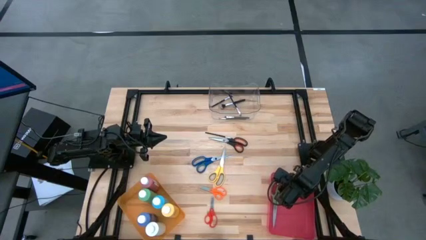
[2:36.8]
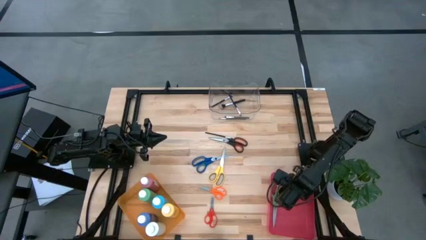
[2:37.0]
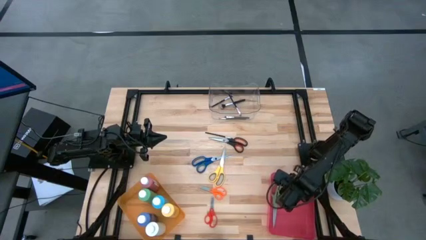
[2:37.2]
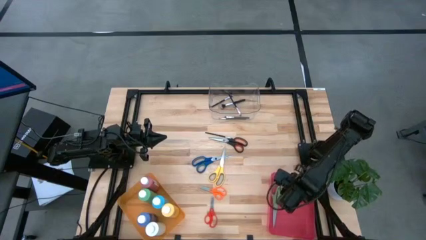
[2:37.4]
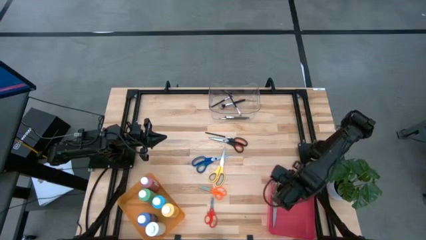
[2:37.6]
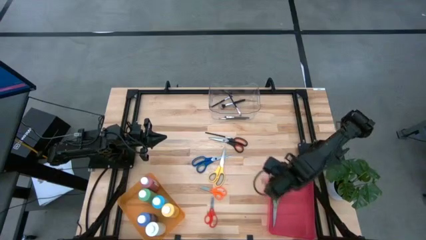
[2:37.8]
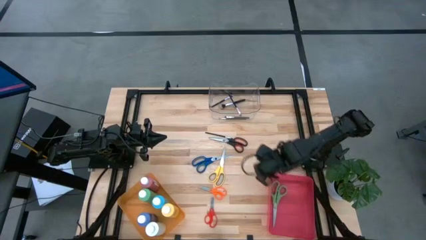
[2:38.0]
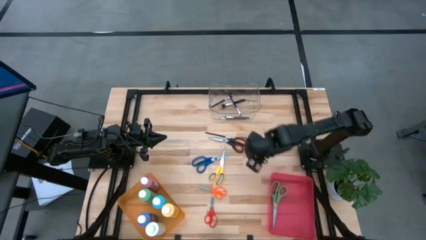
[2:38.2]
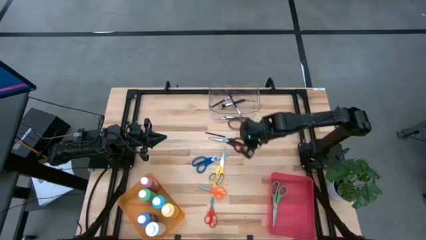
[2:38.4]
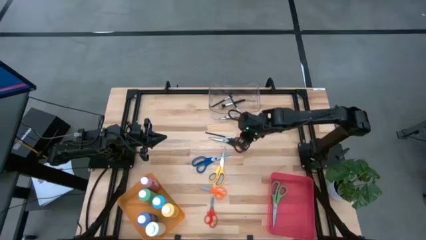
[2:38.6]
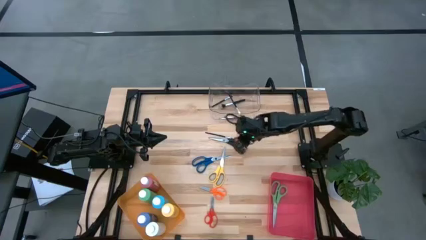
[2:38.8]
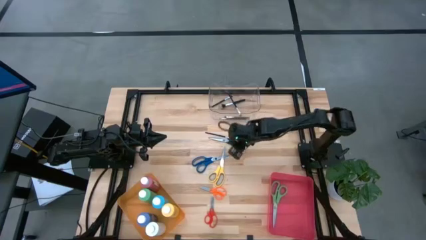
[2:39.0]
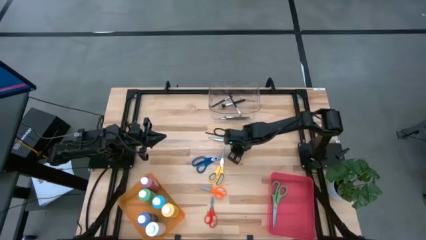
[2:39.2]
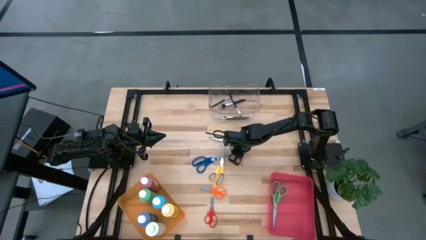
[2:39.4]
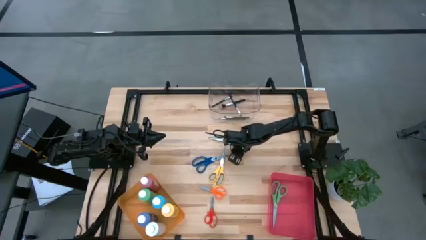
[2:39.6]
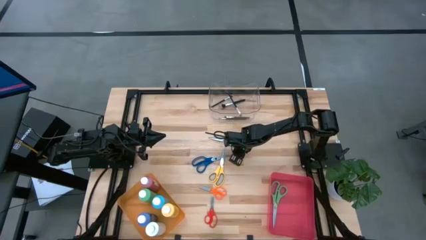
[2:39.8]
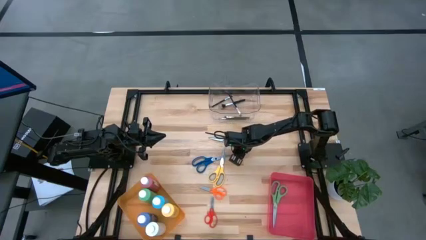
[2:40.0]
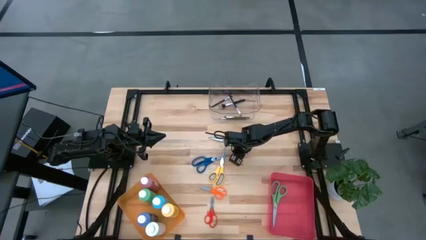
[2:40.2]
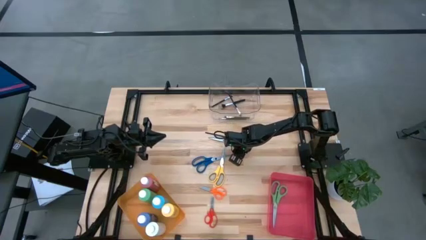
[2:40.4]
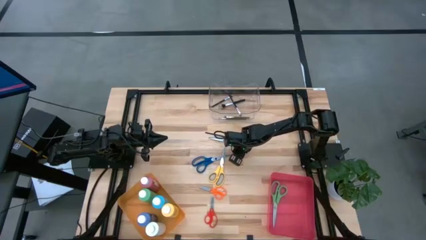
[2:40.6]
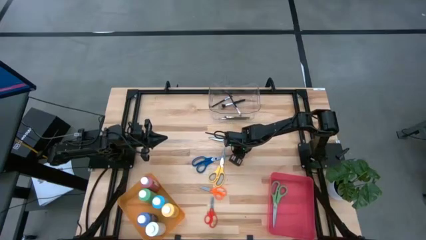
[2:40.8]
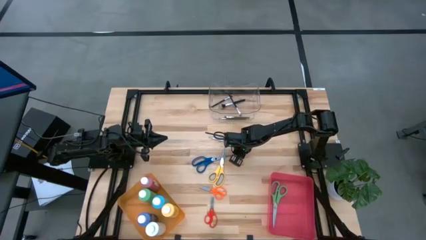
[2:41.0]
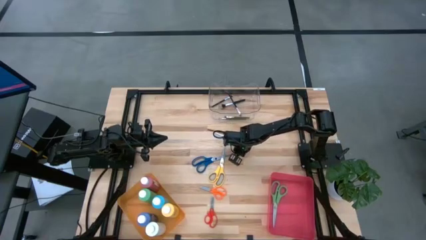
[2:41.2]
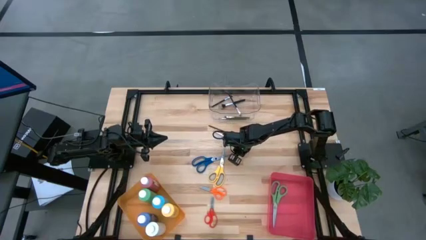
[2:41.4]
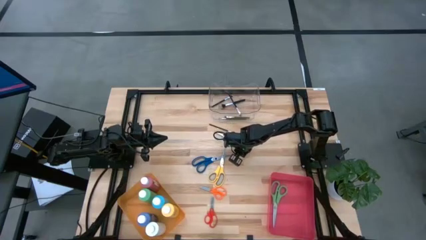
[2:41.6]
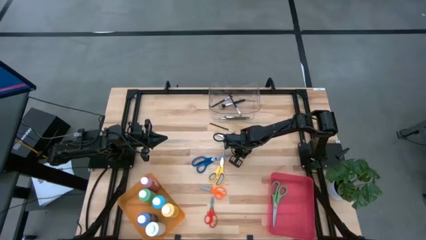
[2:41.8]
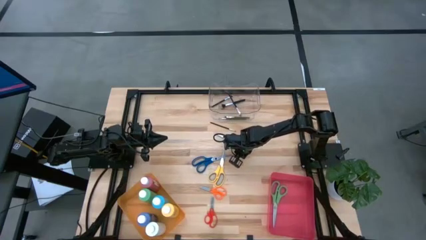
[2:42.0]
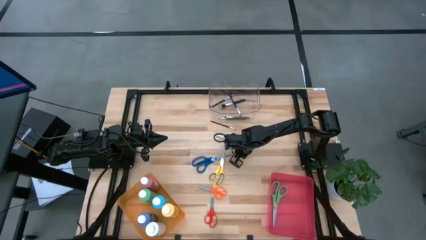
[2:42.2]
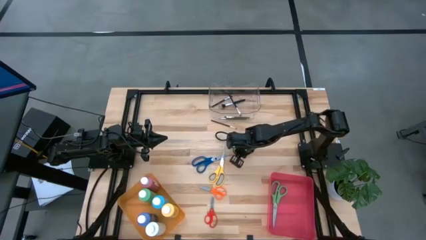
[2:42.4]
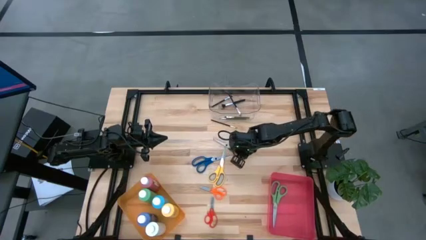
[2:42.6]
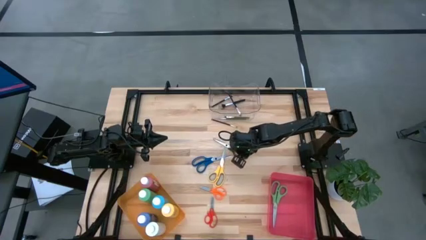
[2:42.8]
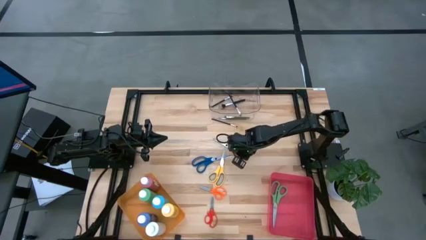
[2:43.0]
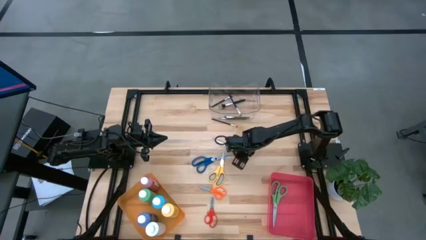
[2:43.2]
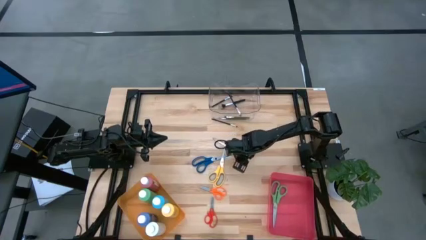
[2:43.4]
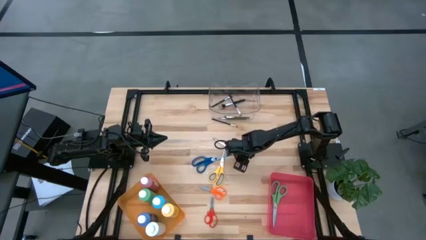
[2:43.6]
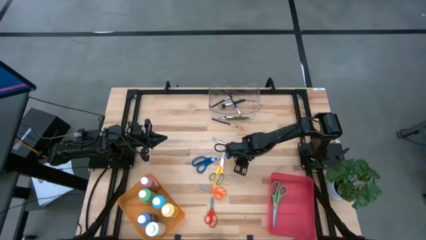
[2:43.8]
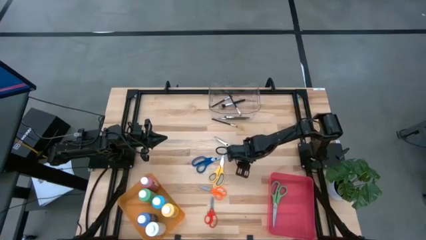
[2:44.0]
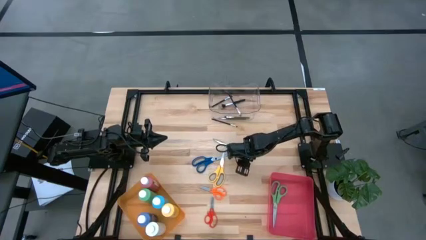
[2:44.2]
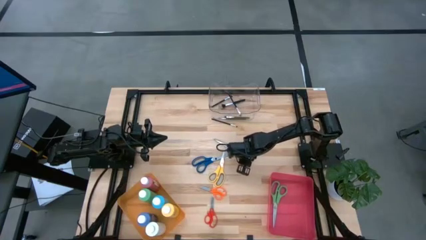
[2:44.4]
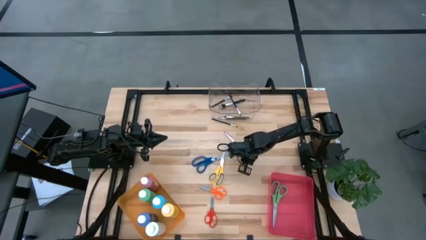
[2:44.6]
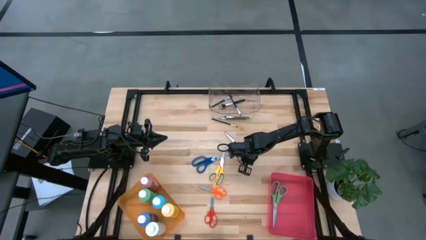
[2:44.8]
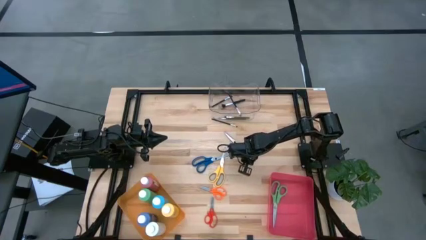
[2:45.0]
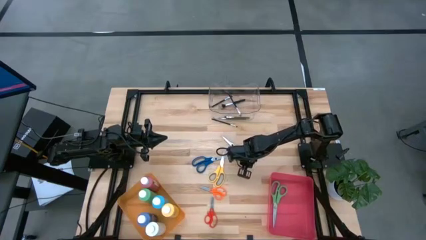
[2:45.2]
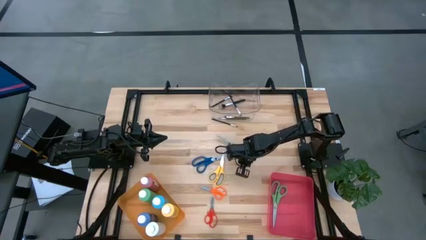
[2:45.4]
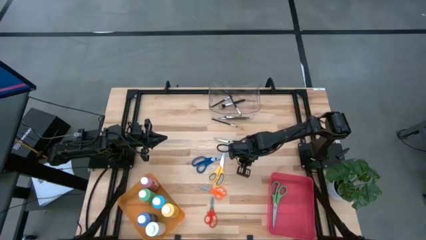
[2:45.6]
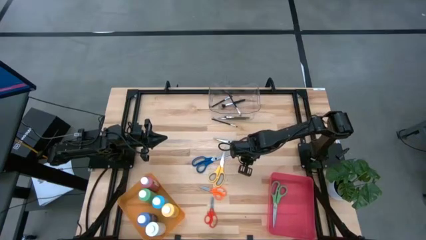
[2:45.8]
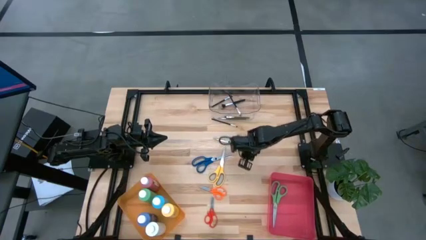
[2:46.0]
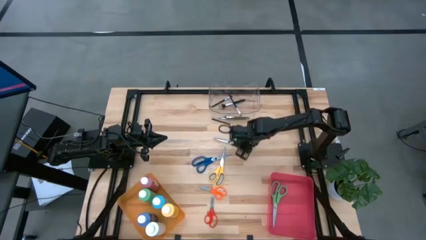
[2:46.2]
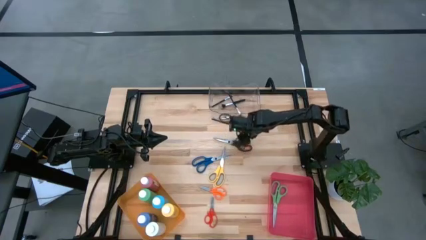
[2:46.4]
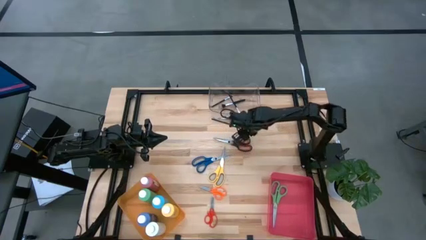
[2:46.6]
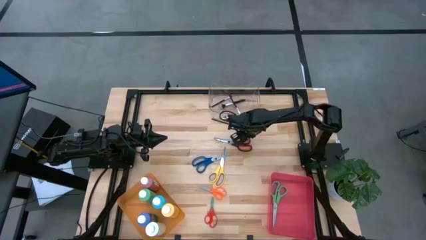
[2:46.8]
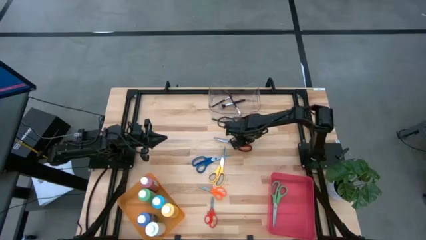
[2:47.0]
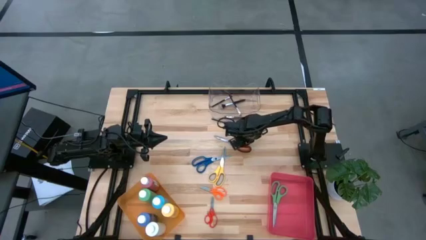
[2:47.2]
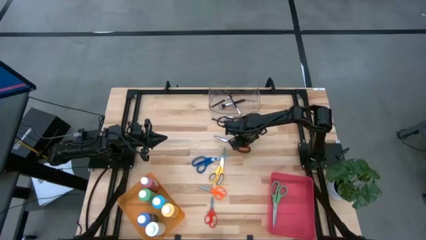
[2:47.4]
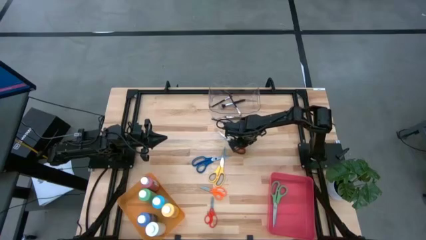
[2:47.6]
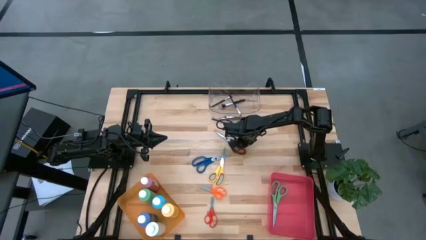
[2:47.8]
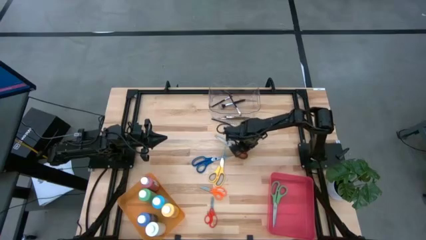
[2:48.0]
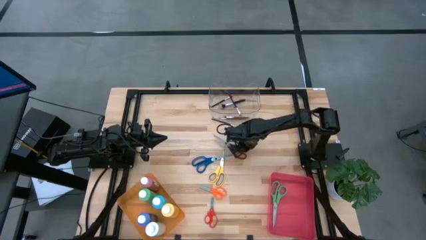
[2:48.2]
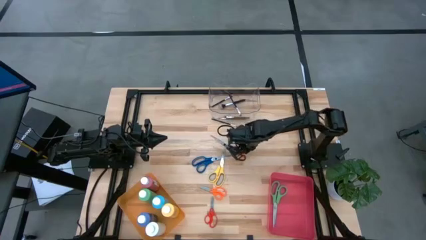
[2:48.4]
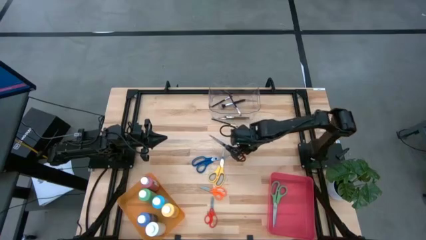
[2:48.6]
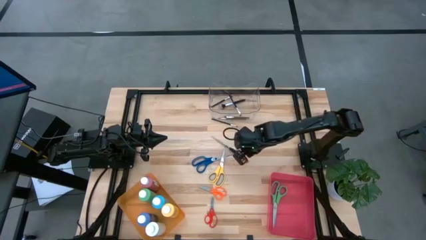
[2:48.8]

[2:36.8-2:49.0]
Task: Pick & Place Paint Supplies
Put the black scissor into the red bin

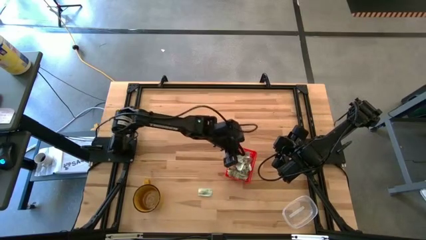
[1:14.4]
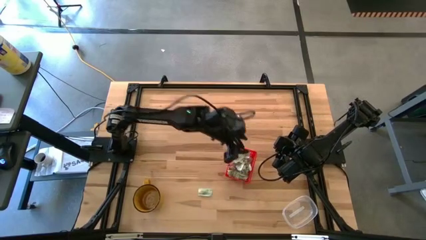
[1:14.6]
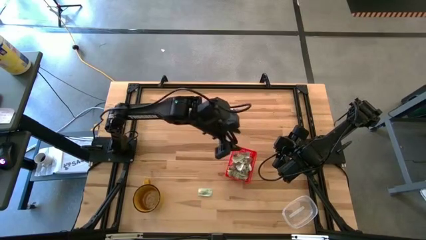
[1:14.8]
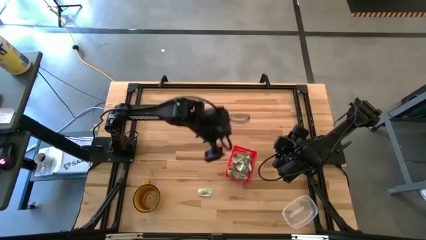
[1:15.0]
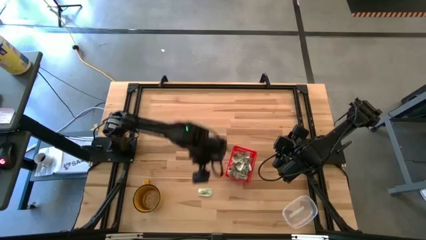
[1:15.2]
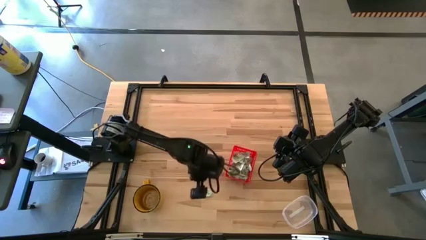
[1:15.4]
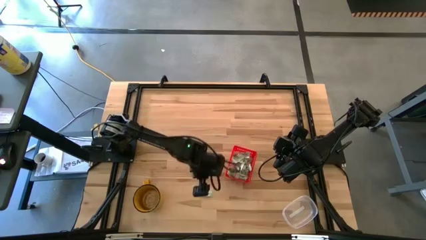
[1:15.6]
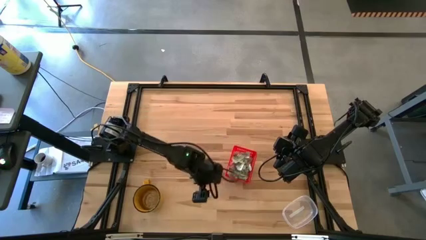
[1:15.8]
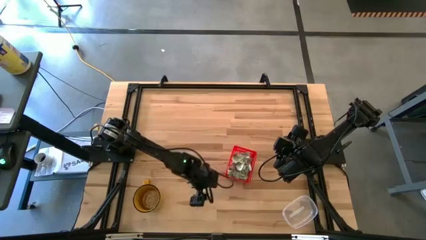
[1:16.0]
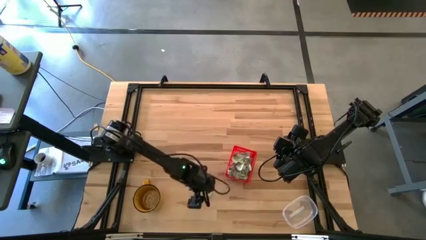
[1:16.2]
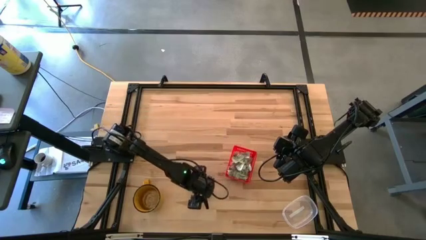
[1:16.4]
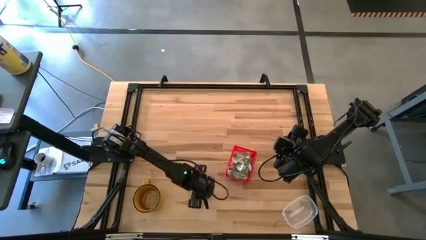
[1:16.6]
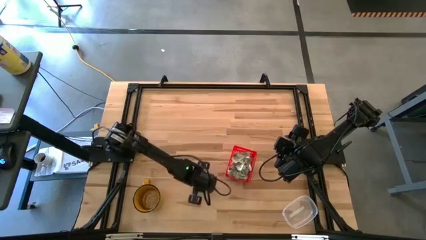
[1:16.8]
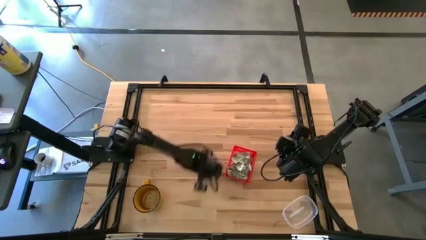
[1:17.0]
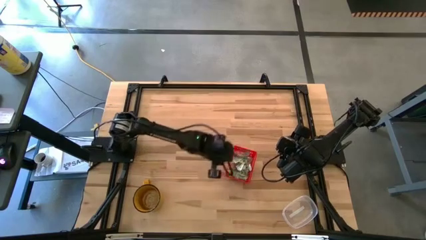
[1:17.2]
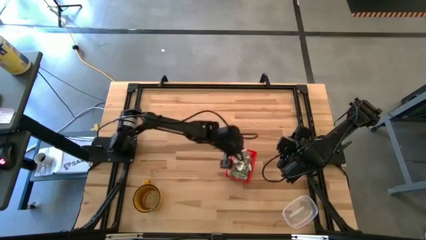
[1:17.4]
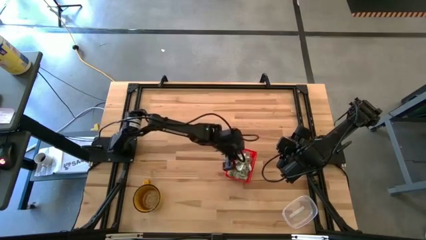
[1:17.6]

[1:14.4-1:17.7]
Task: Pick and place items into bin
Put the light green stevia packet into the red bin

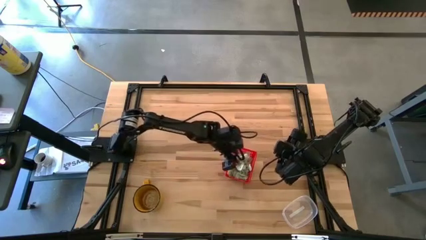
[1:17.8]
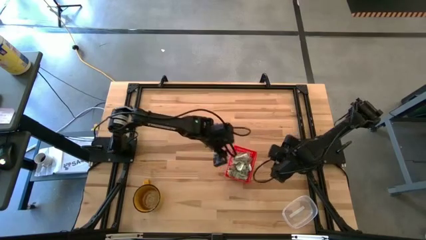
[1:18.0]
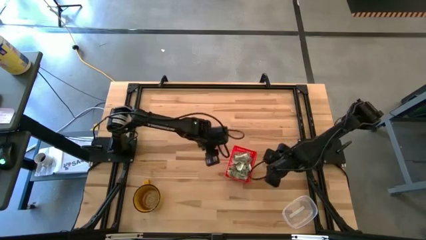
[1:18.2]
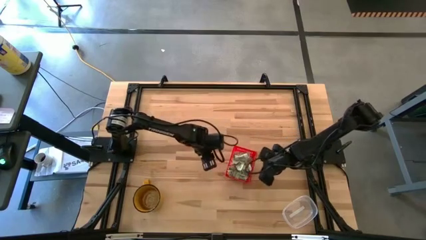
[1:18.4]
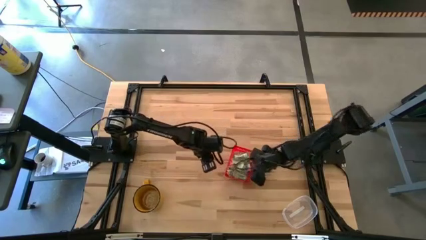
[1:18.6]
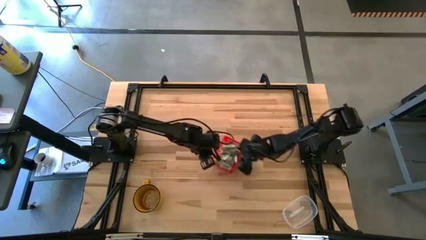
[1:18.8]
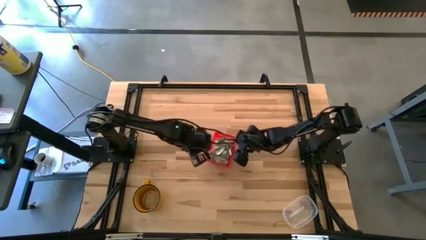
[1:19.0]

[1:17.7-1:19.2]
Move the red bin to the center of the table
